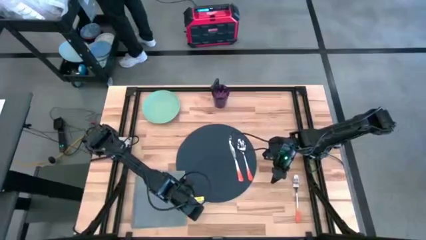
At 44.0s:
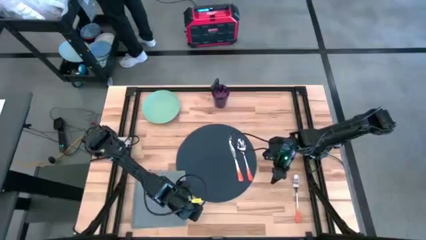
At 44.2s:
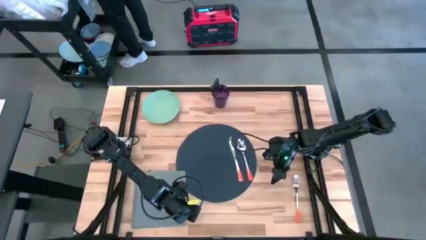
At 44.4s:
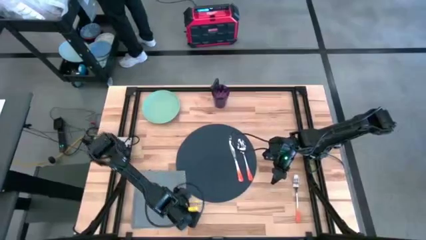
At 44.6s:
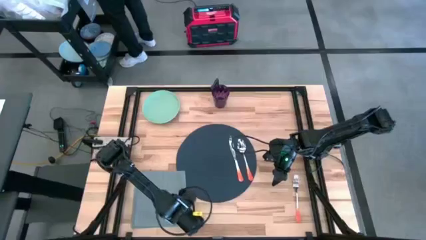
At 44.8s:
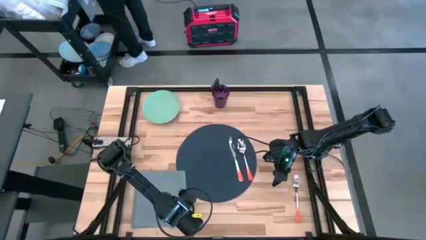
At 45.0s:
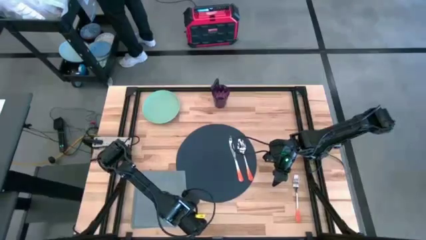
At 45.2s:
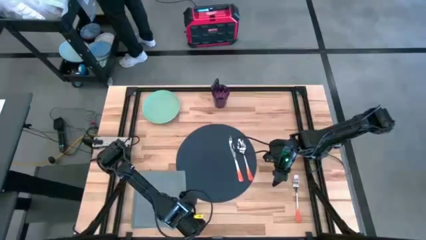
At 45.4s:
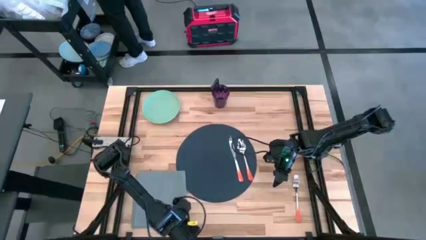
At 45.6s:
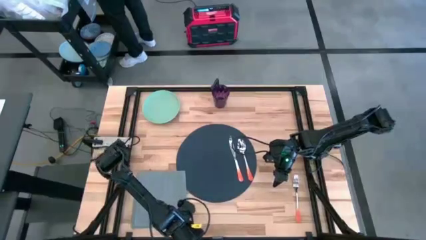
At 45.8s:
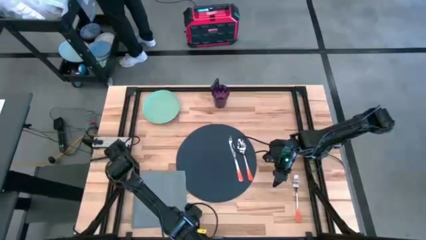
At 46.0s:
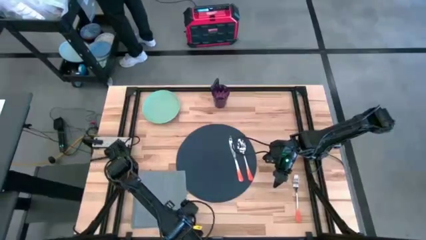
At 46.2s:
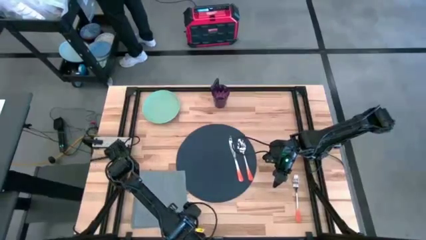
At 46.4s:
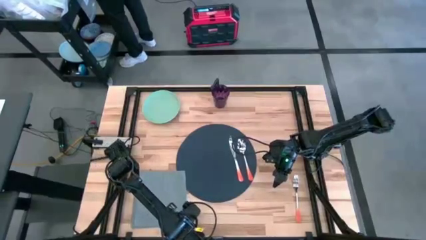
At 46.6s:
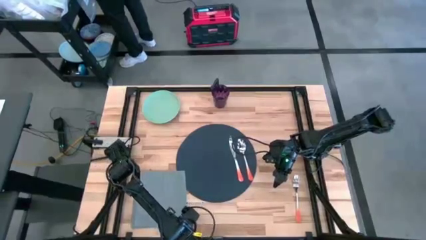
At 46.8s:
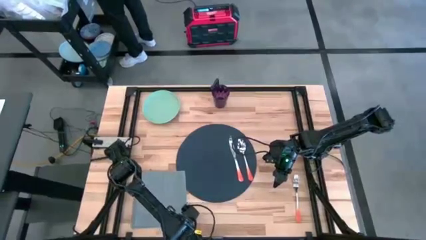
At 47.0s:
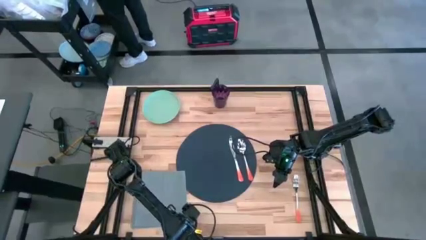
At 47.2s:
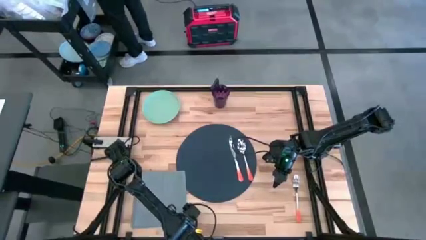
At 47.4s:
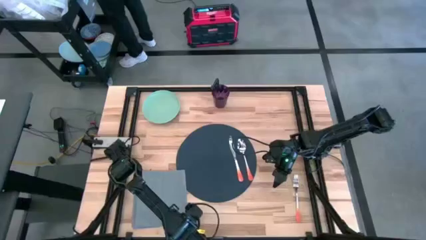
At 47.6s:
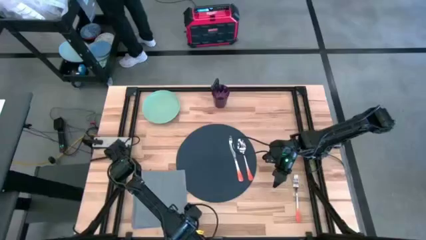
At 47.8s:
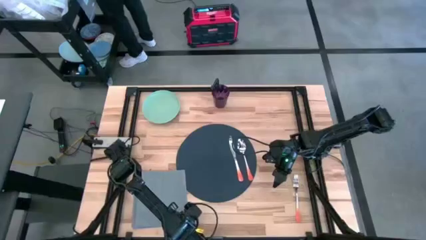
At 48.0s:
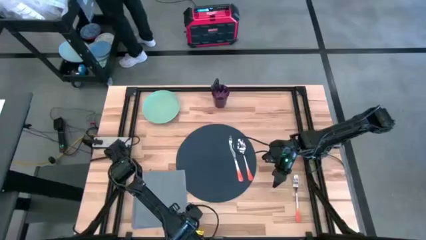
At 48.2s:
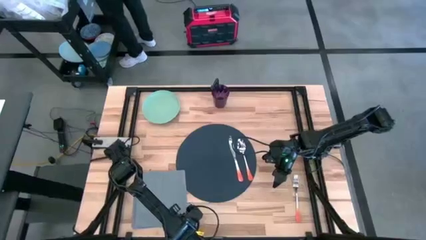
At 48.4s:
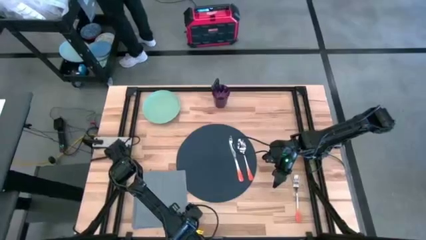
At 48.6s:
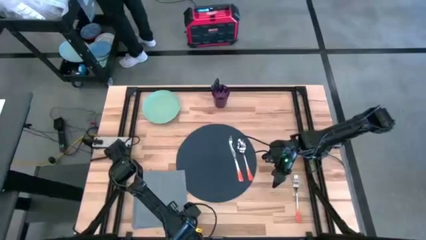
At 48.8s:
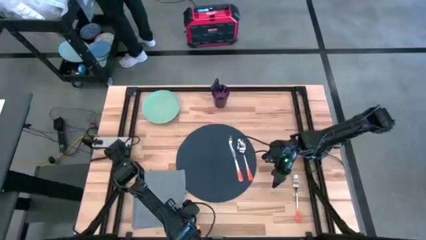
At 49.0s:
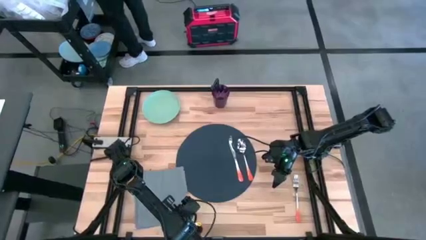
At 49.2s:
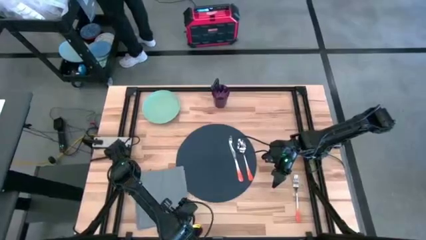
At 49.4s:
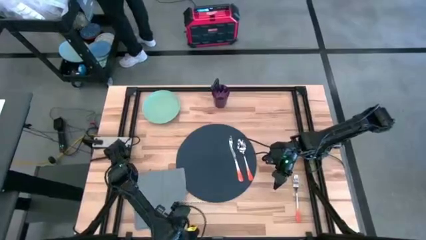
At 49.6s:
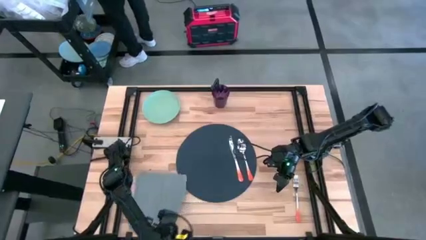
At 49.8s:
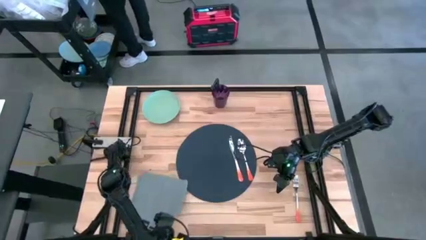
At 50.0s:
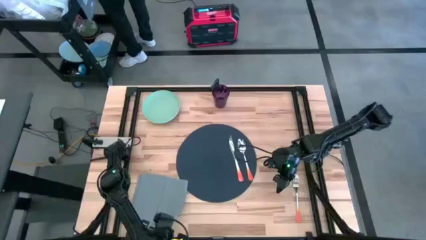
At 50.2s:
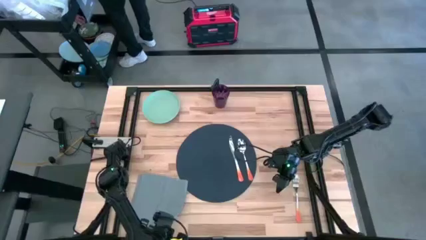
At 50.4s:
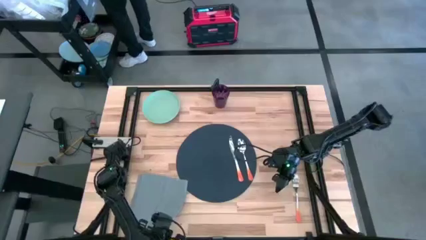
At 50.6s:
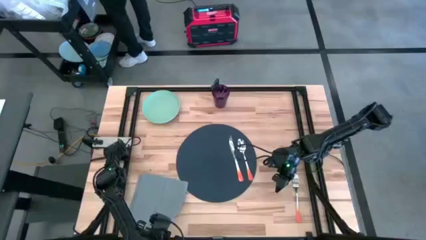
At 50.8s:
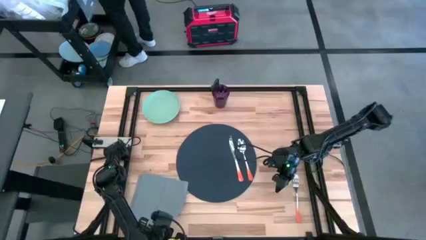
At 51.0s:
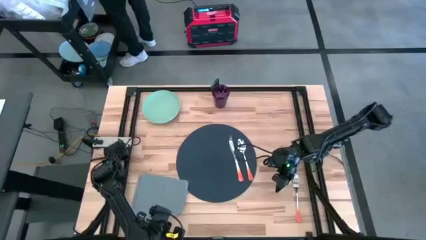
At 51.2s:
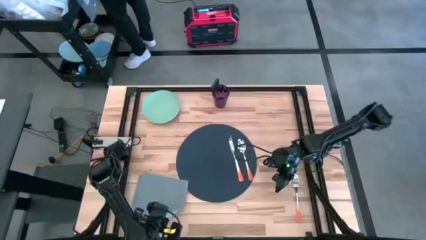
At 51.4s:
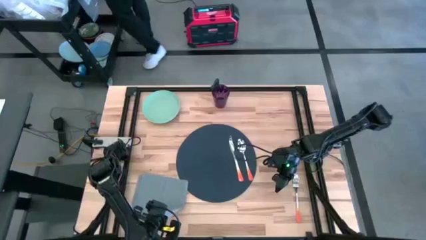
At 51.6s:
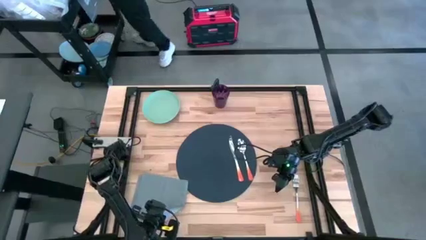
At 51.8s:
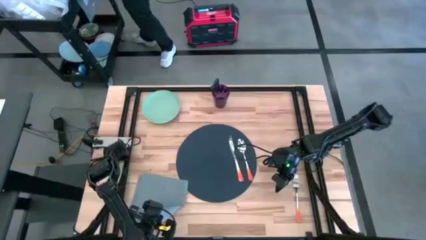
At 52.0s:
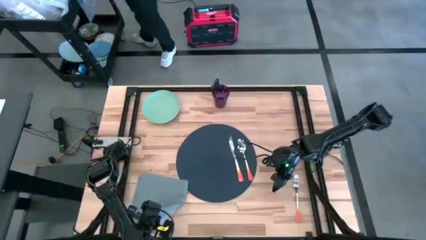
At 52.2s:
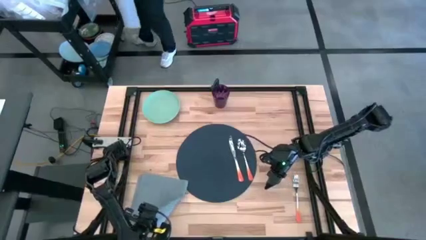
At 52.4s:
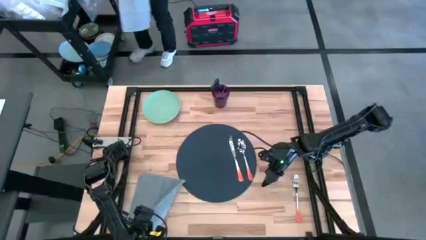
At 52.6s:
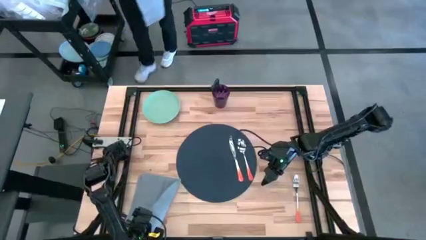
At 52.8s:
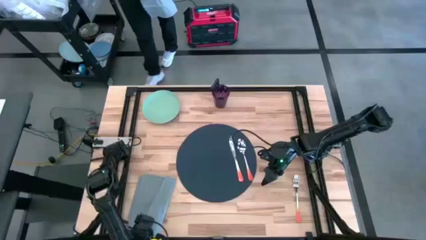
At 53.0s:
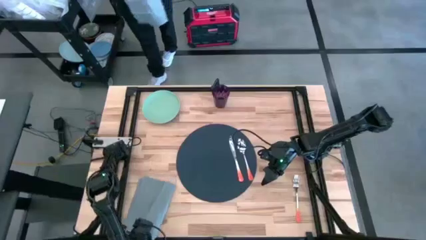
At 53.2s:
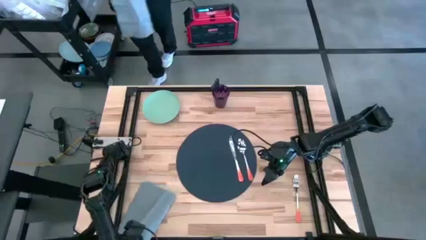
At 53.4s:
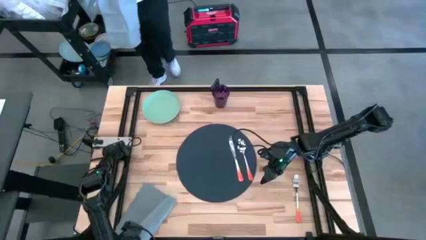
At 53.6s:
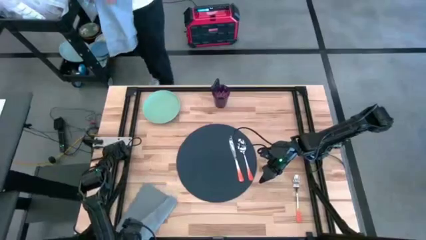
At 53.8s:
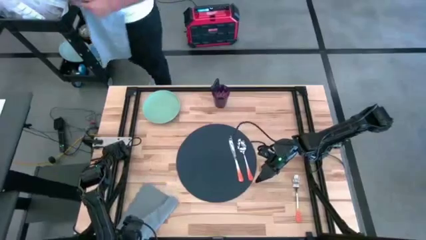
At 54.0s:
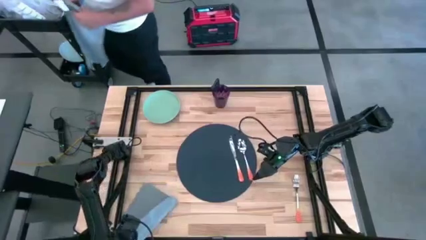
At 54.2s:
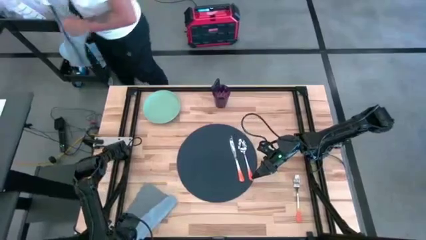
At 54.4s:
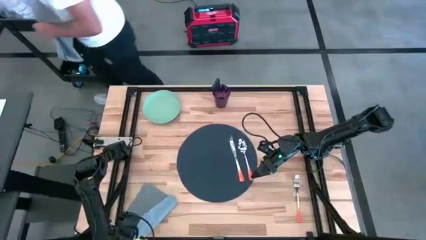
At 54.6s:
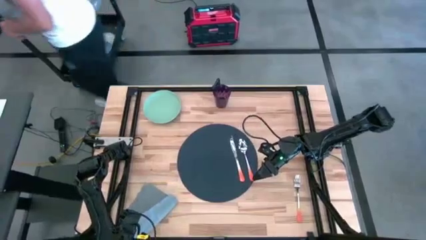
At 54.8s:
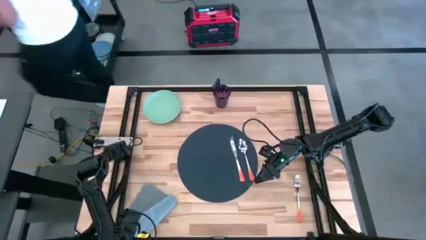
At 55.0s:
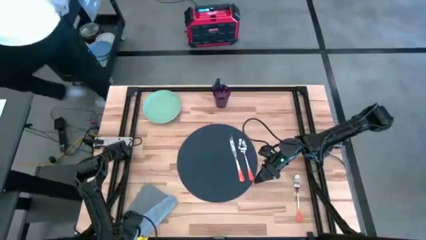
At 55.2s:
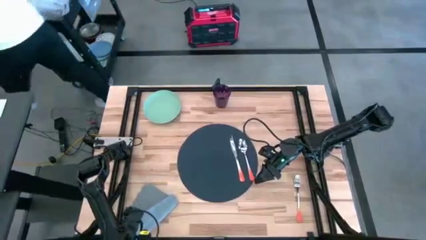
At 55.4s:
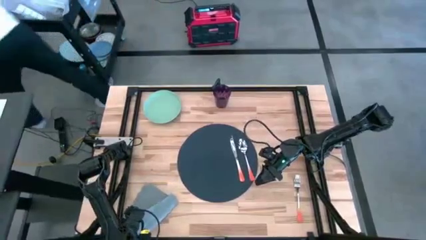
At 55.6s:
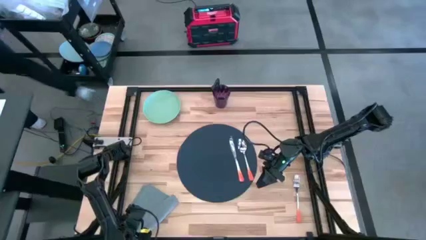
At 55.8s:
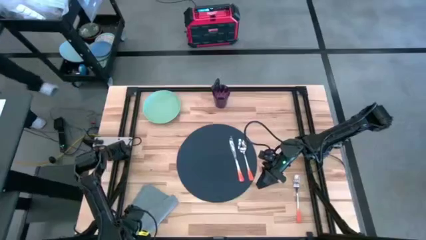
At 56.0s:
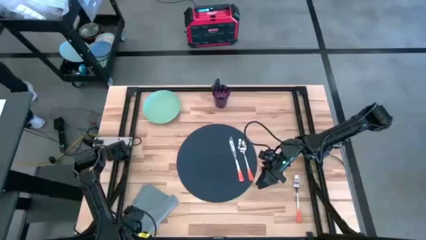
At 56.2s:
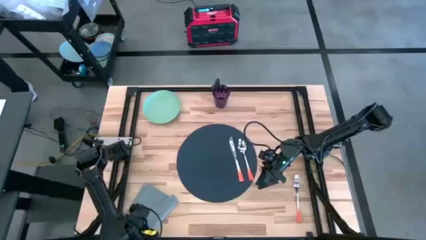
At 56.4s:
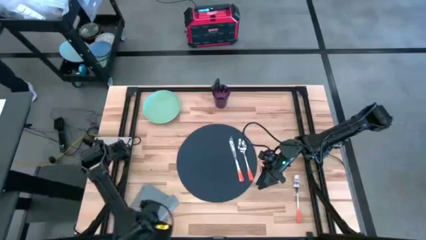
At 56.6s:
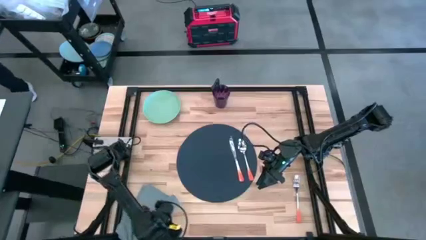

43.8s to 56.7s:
Task: Set table place
Fold the table napkin

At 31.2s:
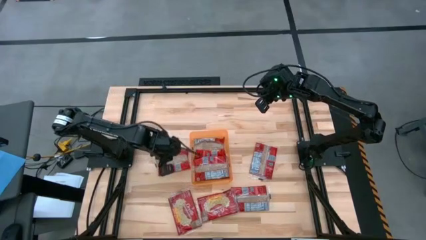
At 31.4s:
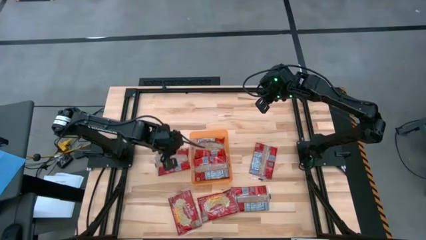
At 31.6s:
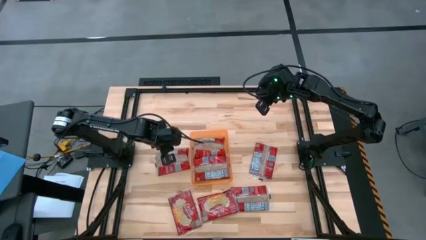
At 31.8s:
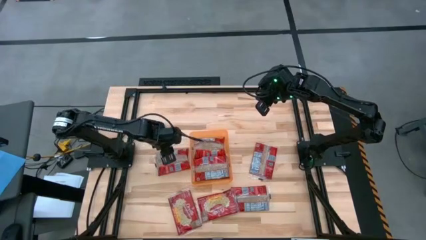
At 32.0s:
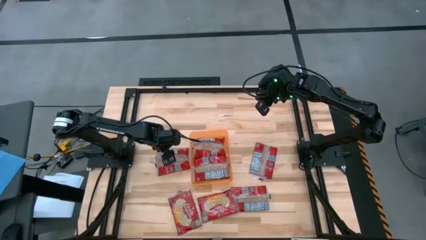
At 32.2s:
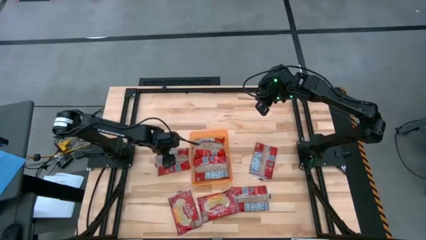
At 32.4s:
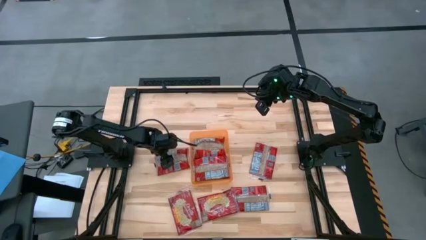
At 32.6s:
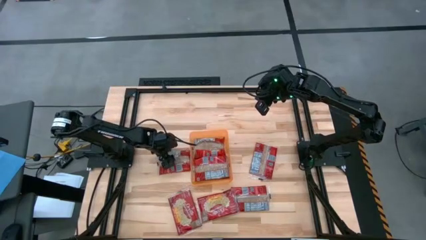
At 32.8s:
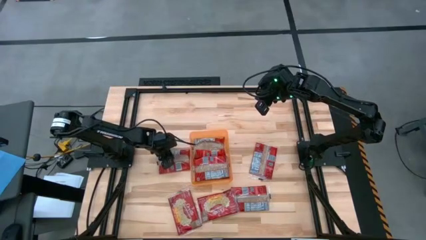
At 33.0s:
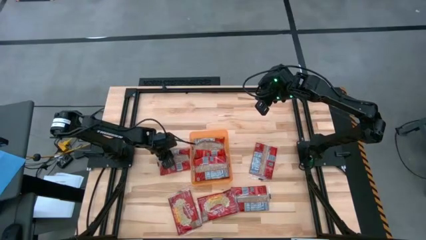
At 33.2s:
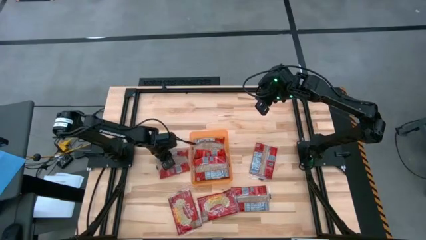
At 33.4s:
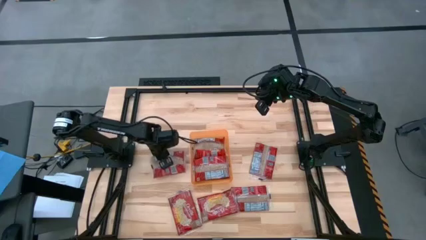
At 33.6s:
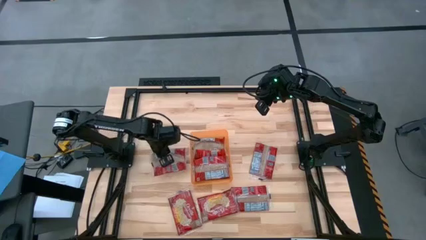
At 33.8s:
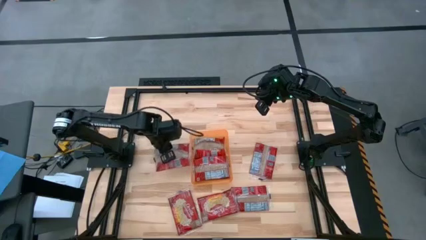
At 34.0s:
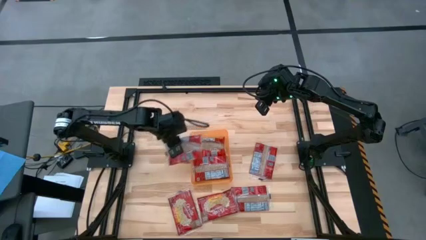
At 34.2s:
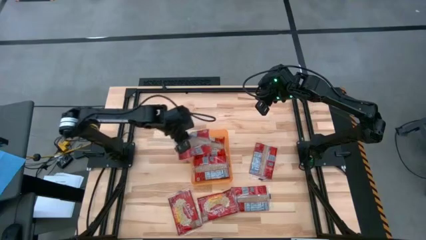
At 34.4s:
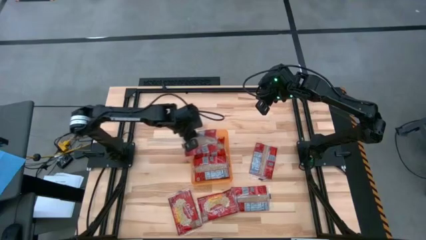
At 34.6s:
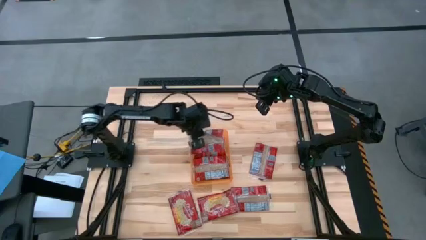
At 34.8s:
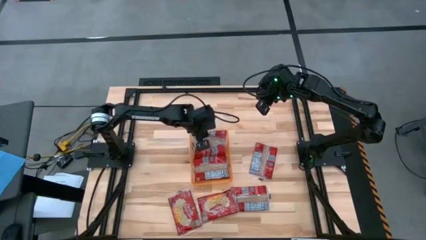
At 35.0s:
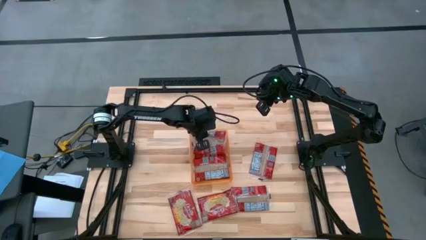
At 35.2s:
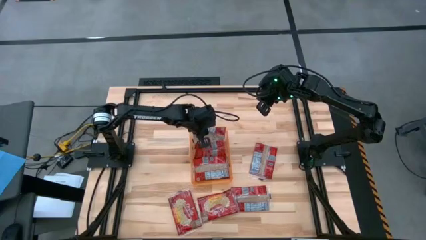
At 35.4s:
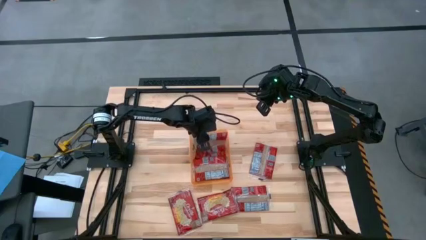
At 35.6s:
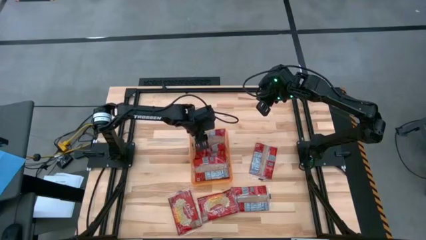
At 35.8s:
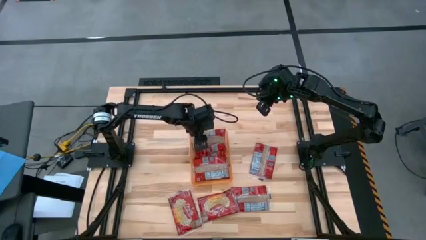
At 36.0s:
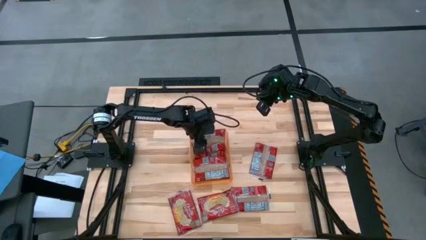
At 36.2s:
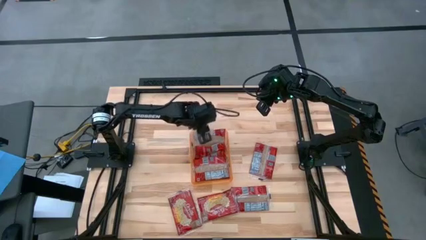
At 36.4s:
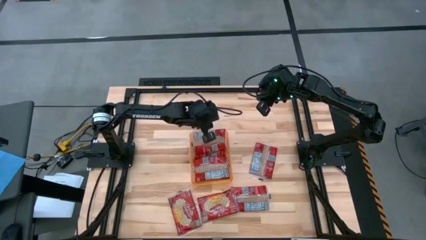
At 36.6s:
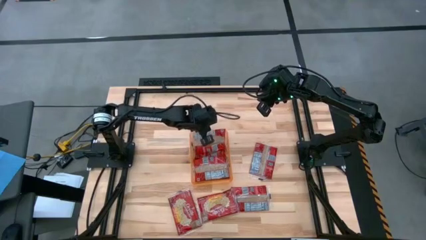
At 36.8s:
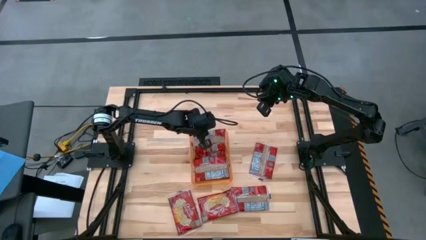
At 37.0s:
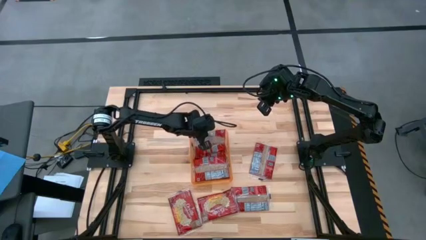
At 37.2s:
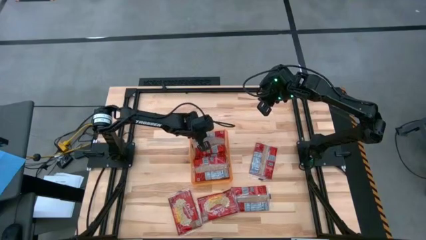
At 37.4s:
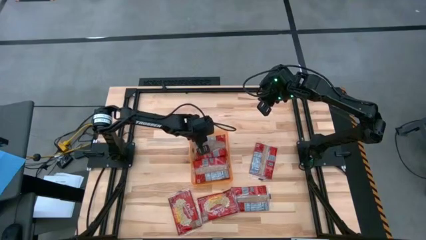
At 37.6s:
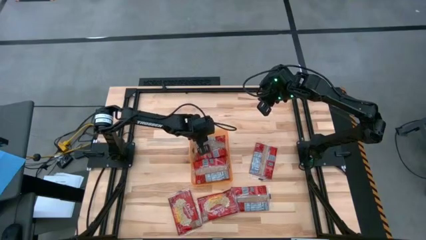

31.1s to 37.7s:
Task: Sort popcorn bags into baskets
Put the red popcorn bag into the orange bin
